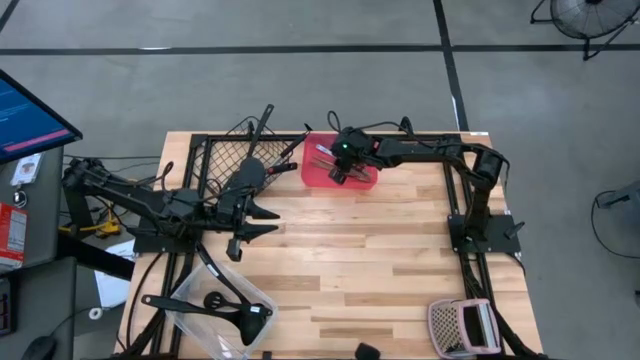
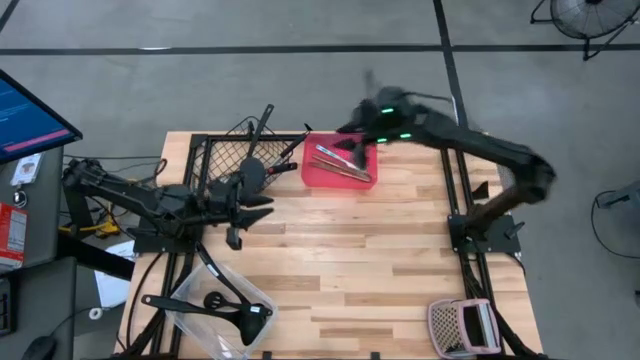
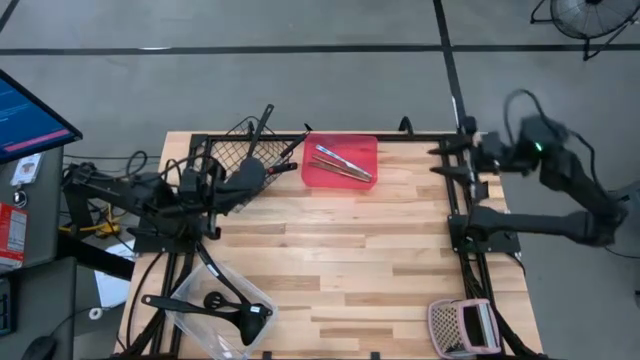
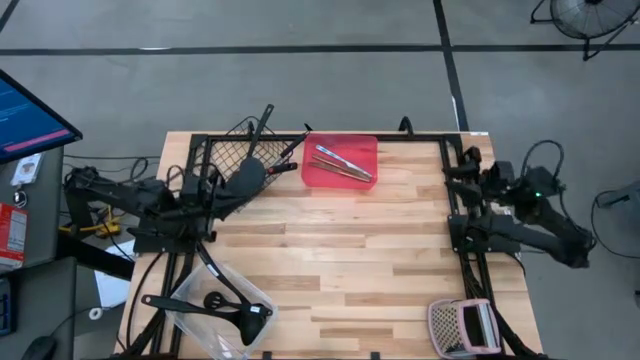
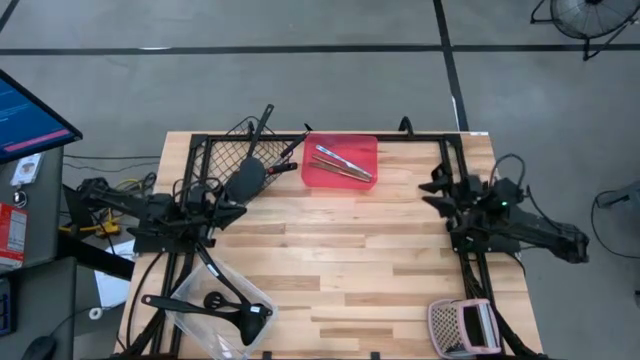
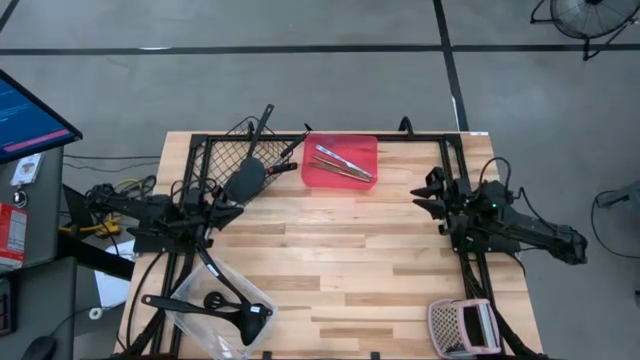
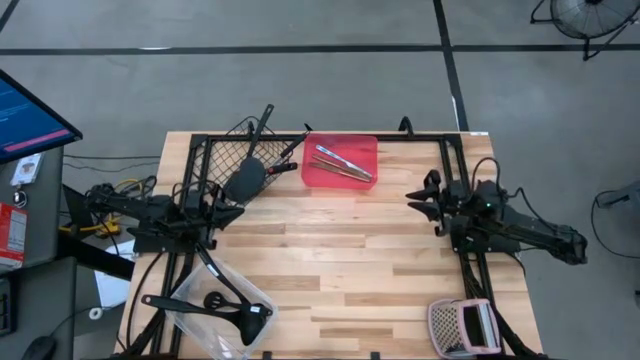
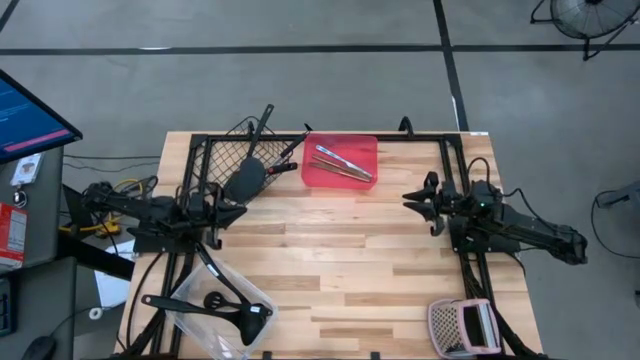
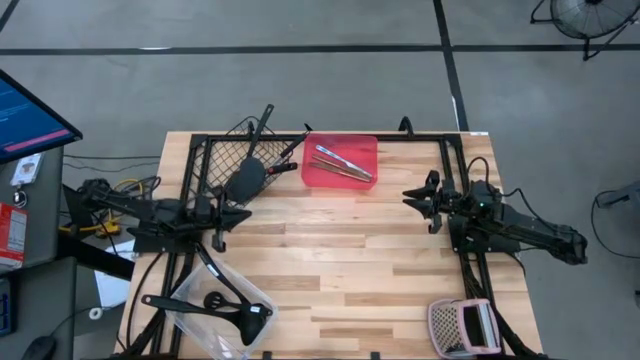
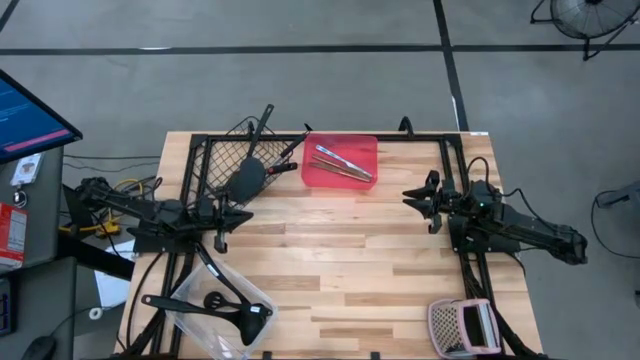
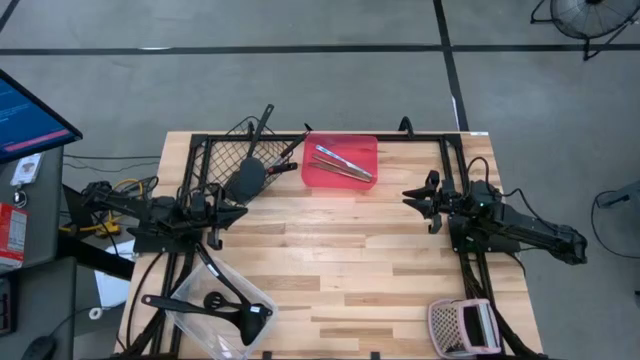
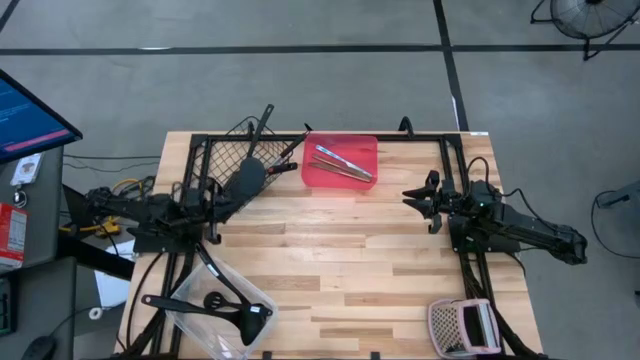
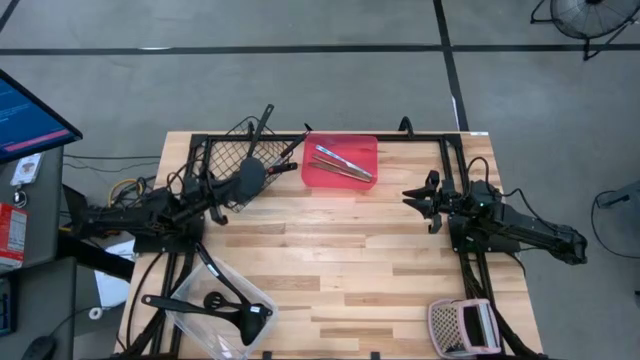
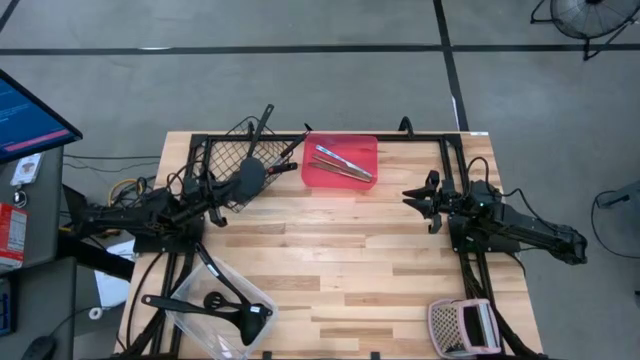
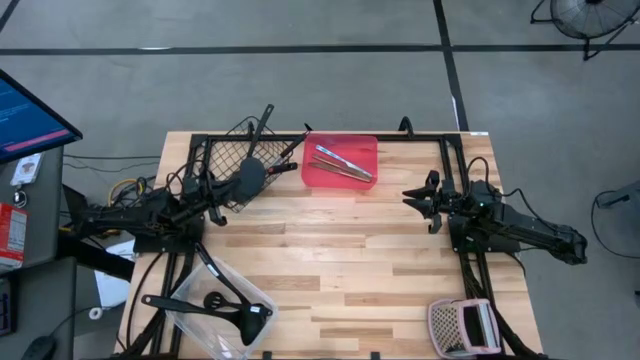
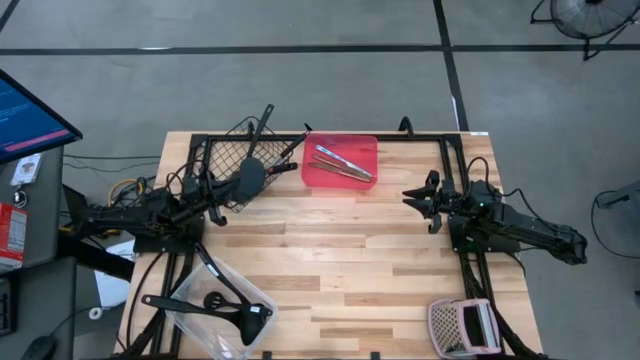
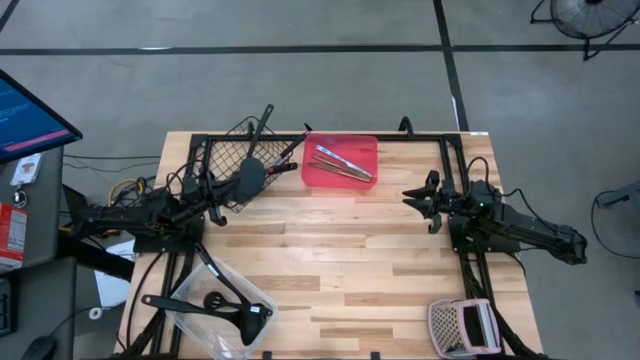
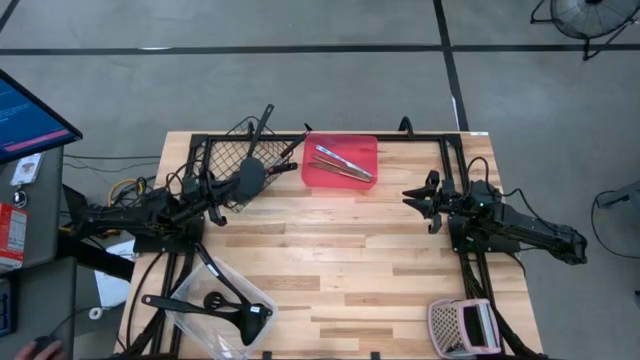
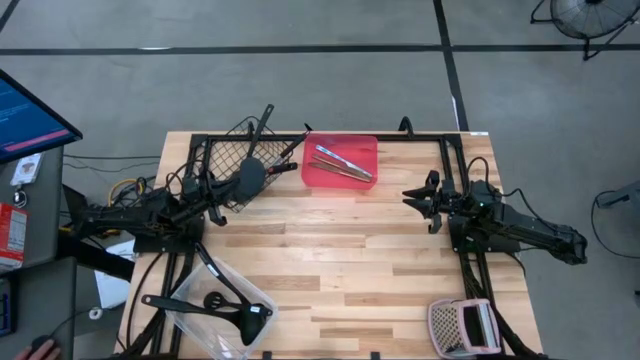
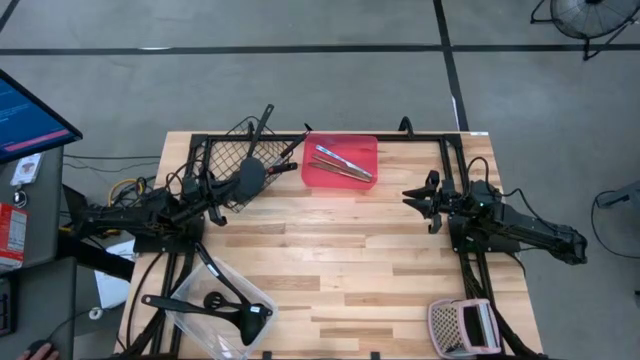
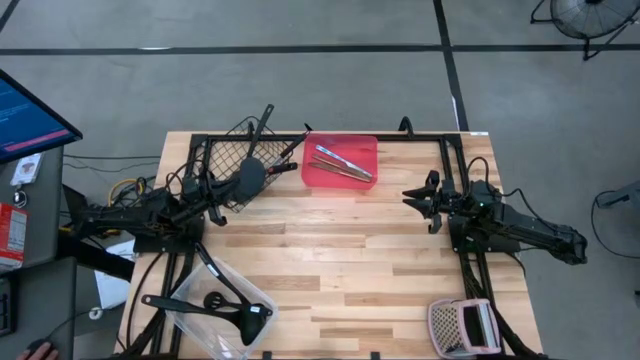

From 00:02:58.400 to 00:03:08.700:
Task: Pick & Place Kitchen Items
Return to Home Position

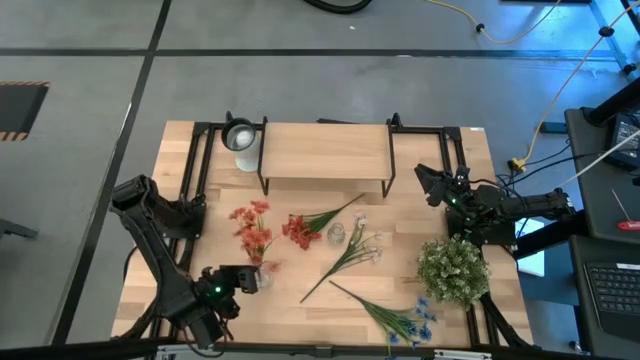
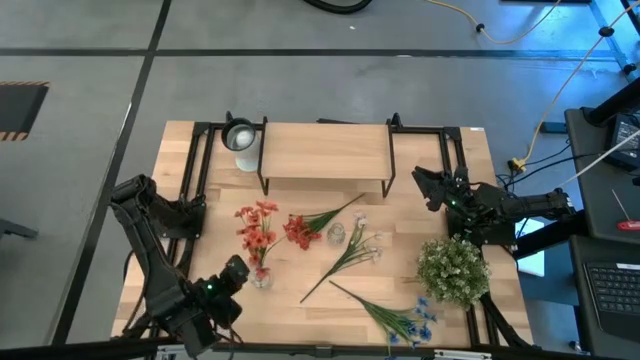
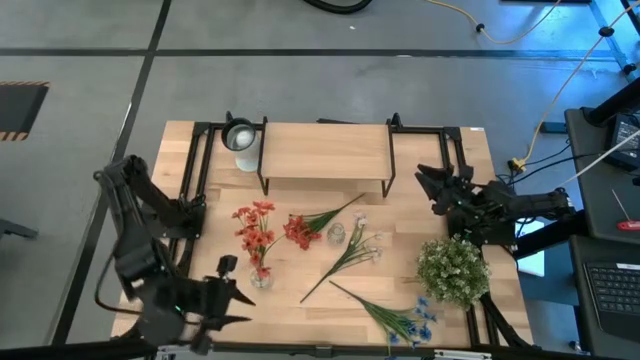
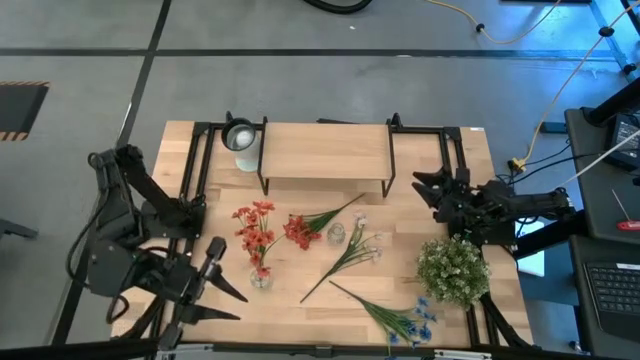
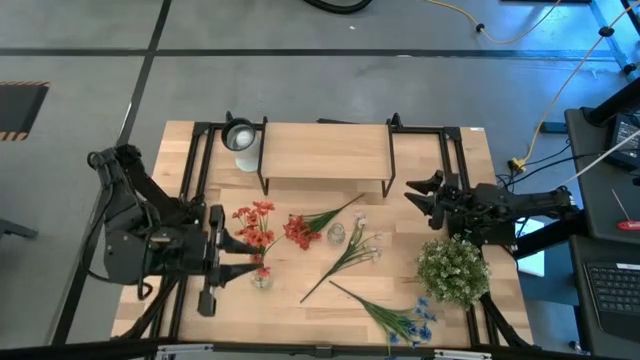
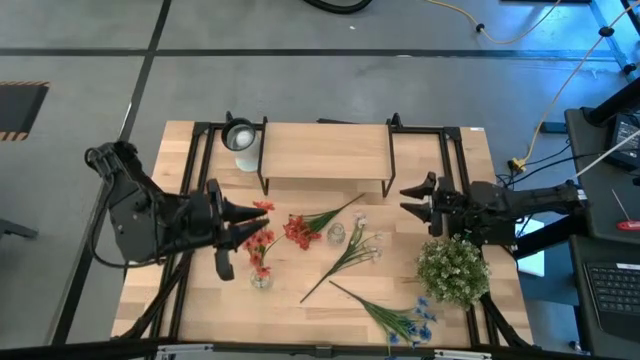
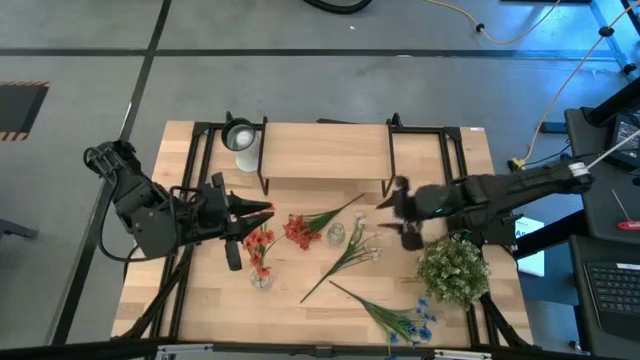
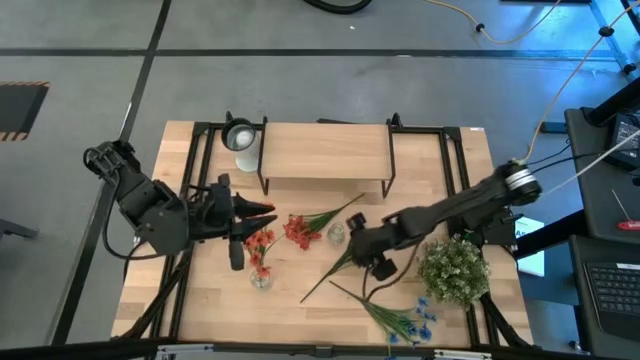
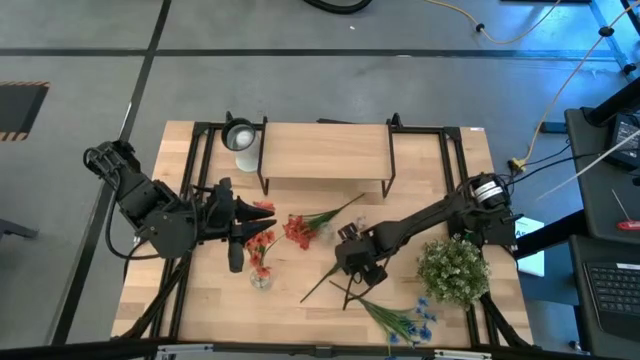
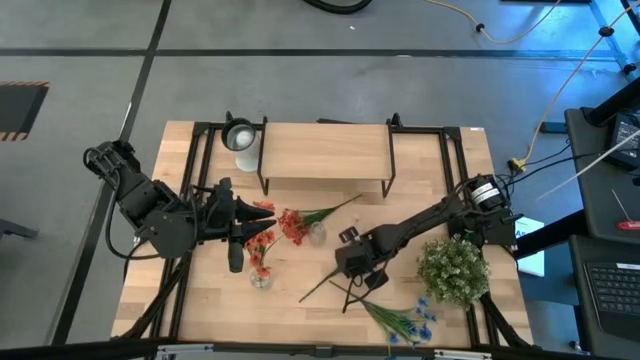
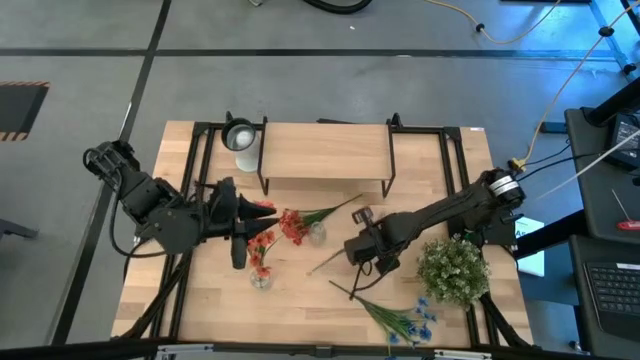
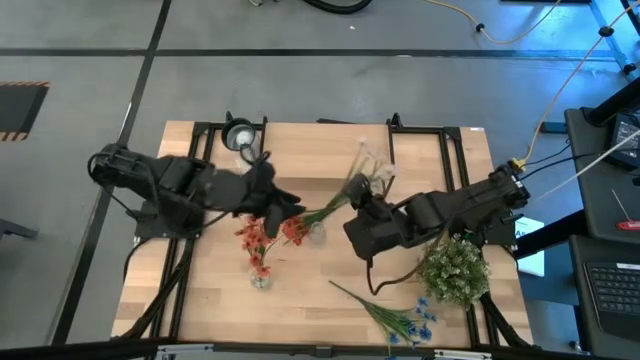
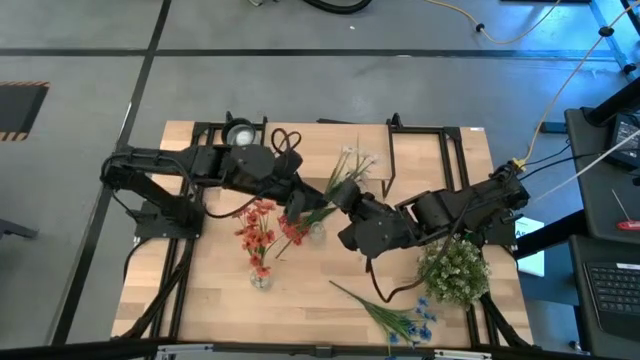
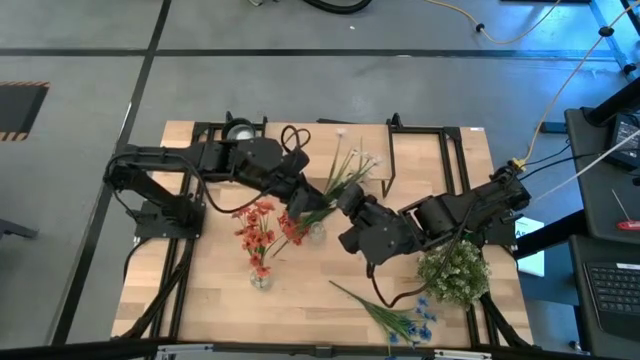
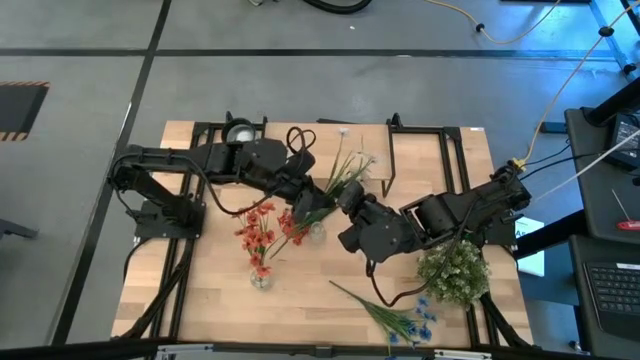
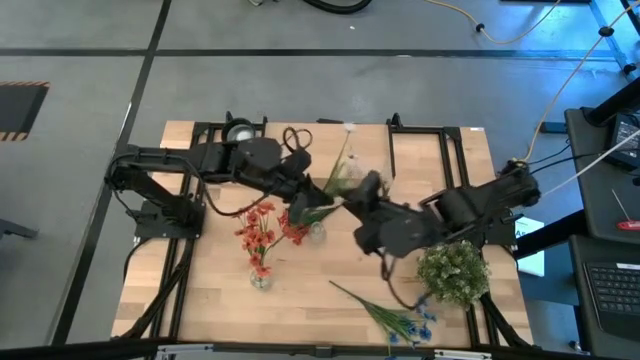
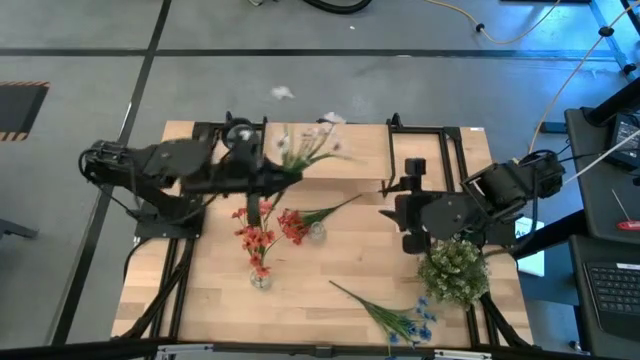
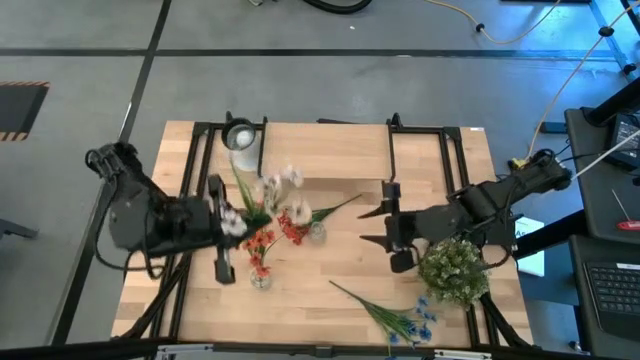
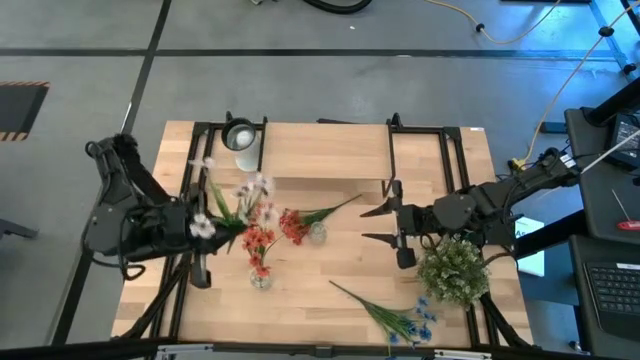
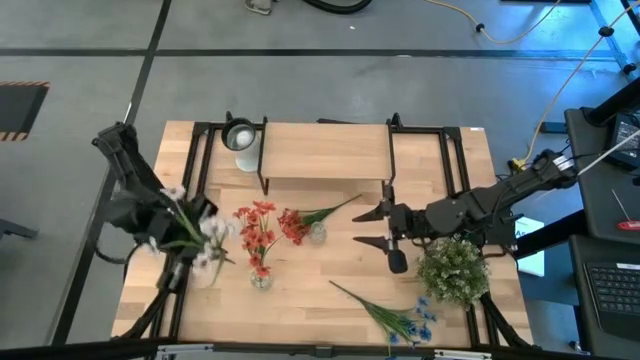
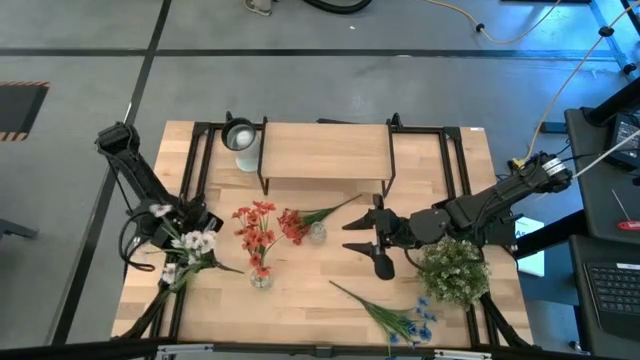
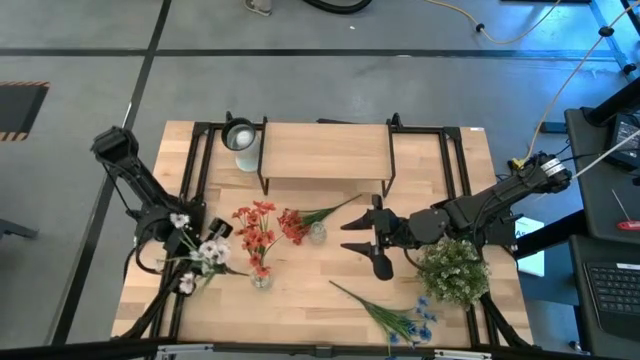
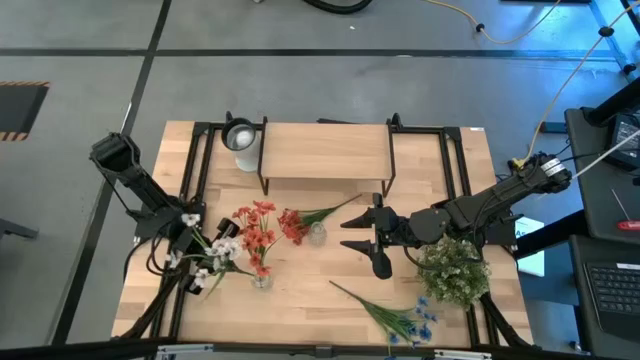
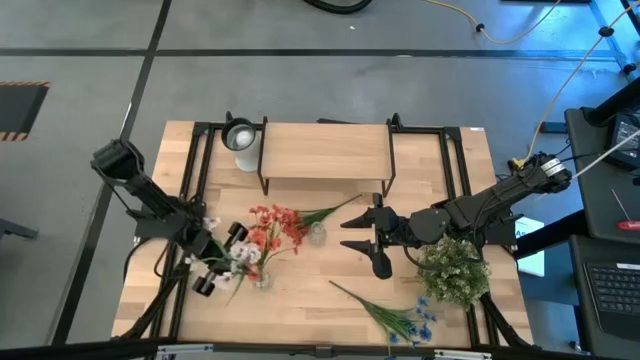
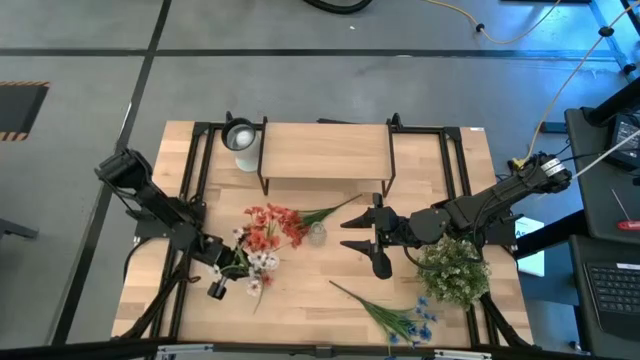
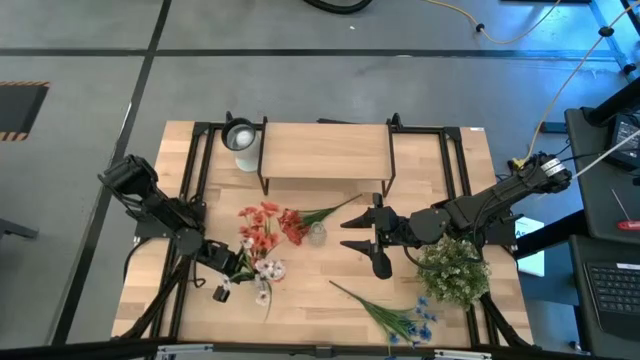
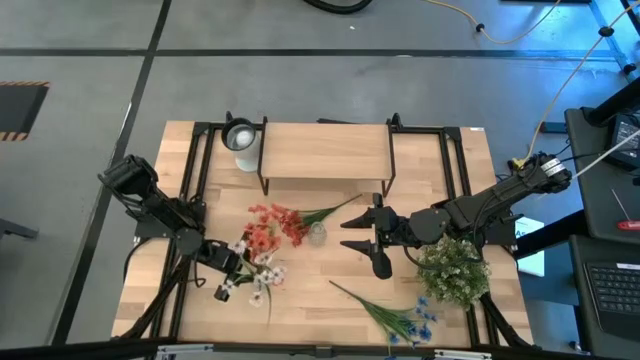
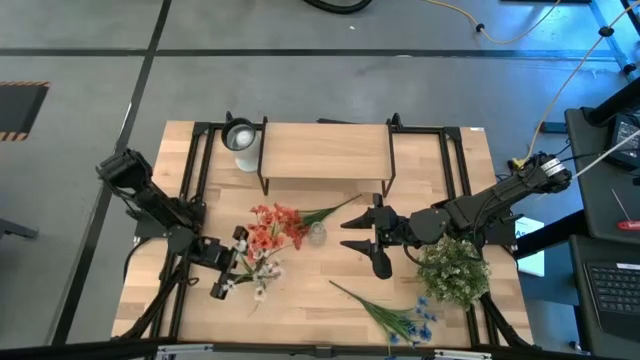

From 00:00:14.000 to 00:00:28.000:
Task: Pick and place flowers into a vace then onto a shelf
Put the white flowers into the left transparent vase
